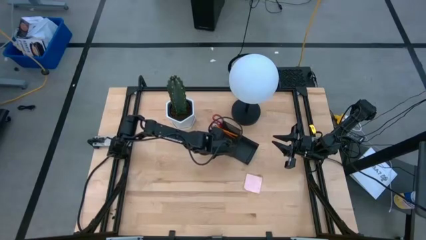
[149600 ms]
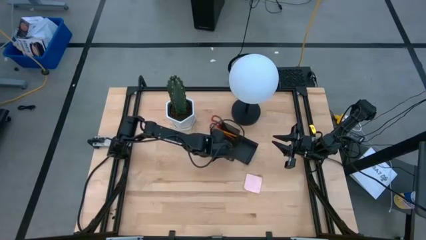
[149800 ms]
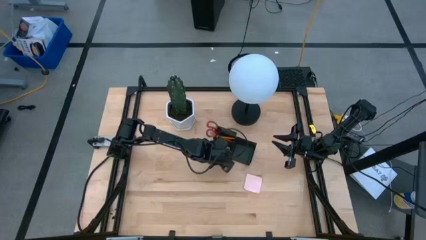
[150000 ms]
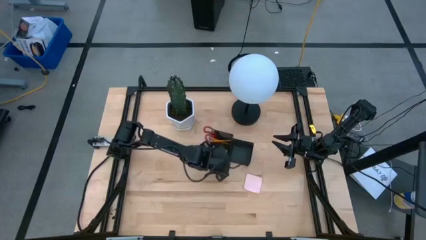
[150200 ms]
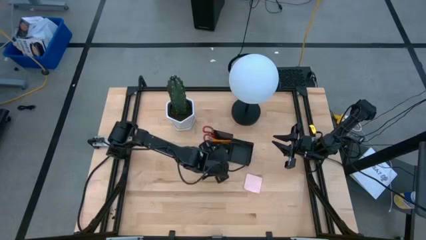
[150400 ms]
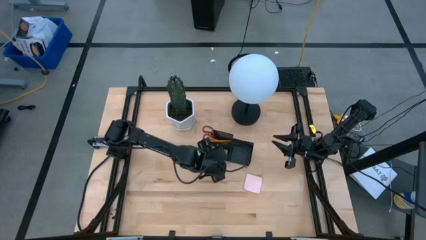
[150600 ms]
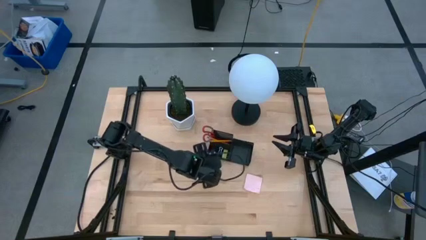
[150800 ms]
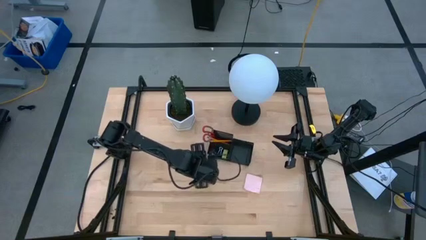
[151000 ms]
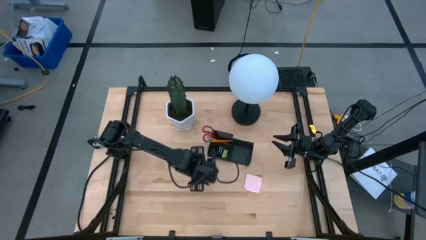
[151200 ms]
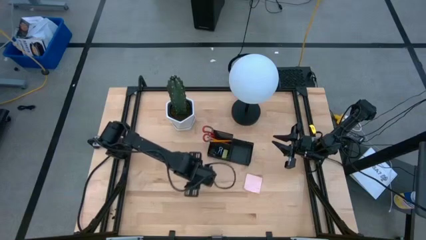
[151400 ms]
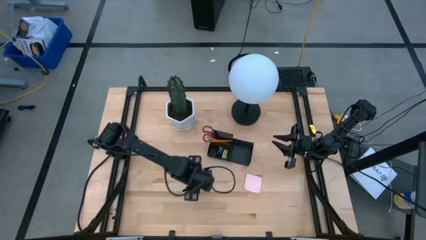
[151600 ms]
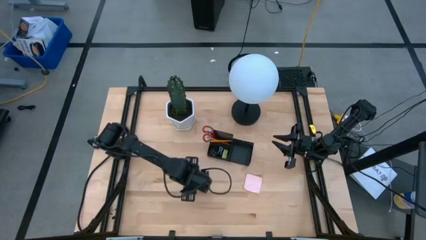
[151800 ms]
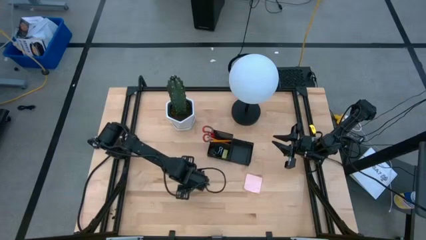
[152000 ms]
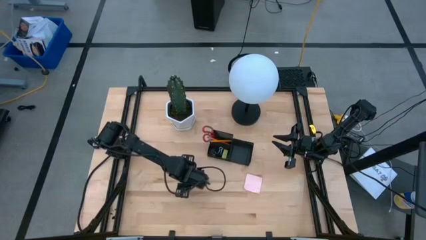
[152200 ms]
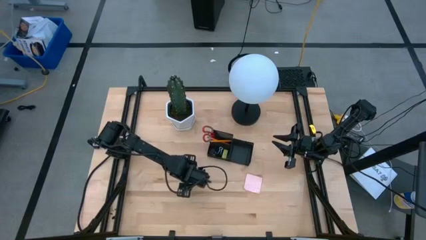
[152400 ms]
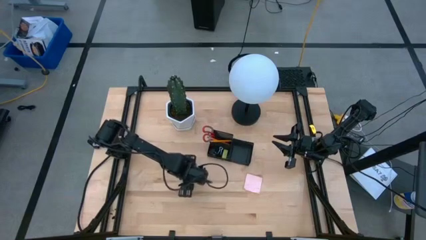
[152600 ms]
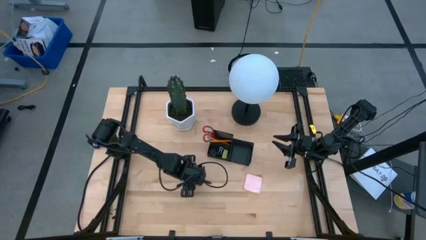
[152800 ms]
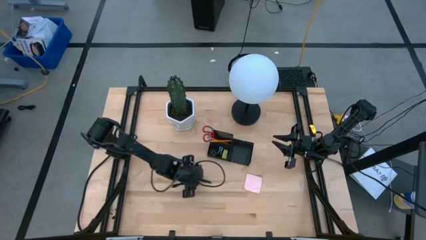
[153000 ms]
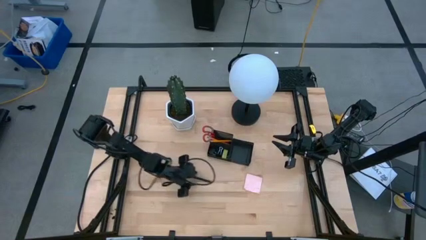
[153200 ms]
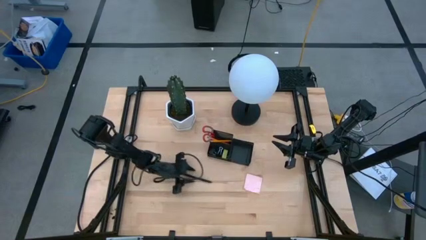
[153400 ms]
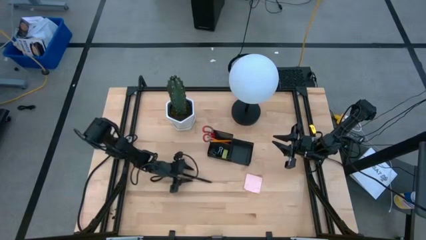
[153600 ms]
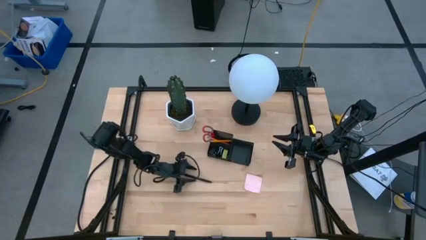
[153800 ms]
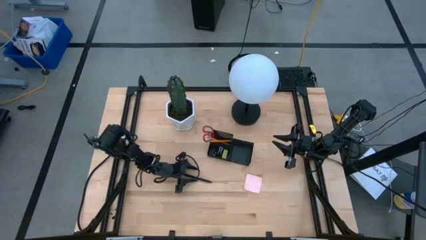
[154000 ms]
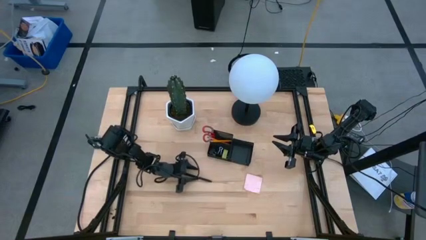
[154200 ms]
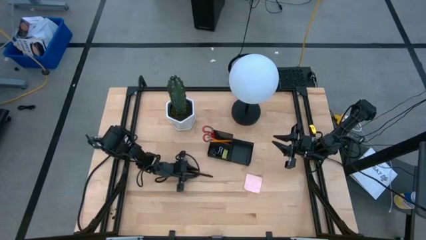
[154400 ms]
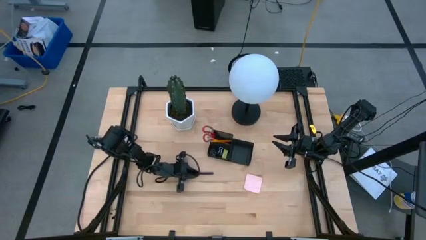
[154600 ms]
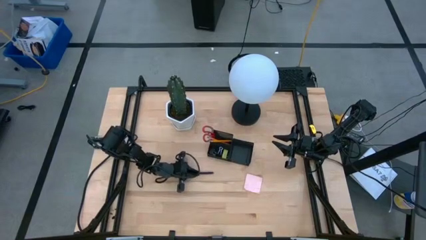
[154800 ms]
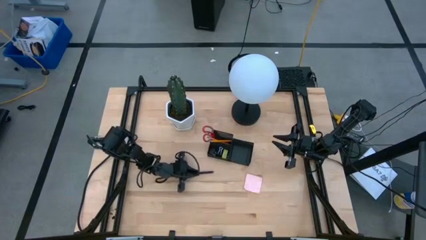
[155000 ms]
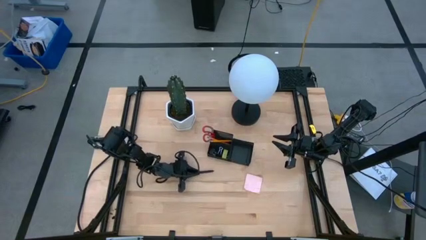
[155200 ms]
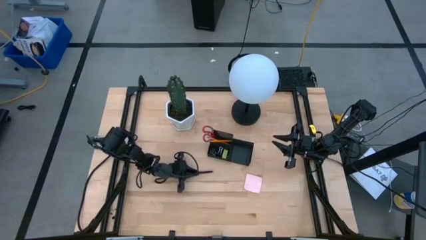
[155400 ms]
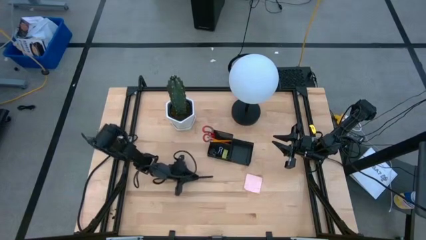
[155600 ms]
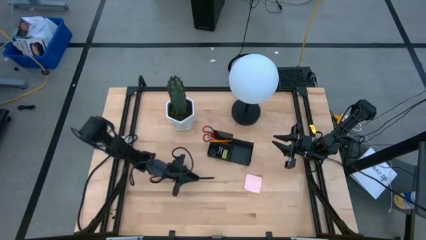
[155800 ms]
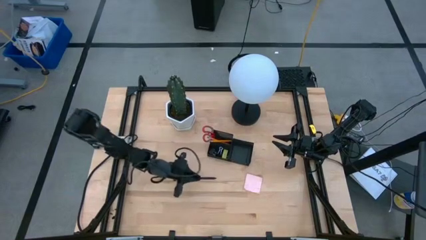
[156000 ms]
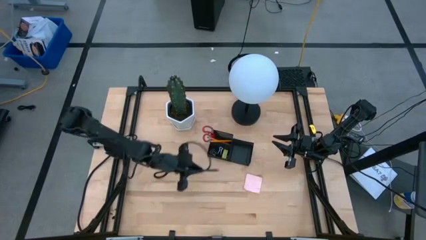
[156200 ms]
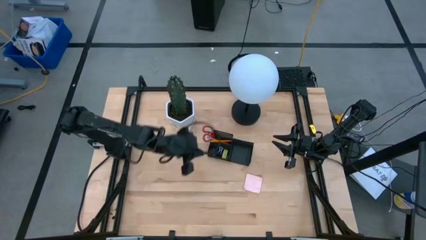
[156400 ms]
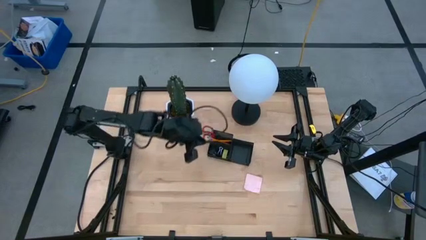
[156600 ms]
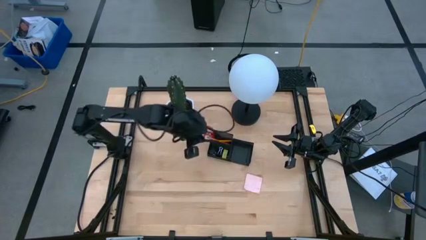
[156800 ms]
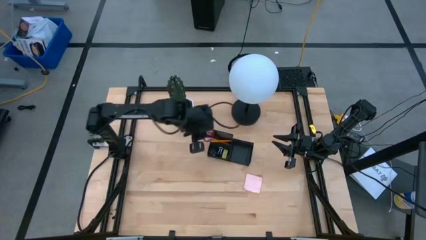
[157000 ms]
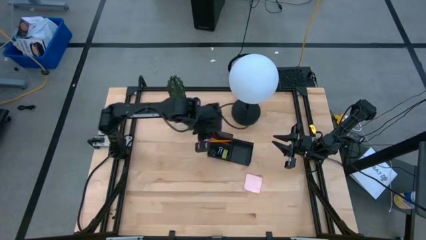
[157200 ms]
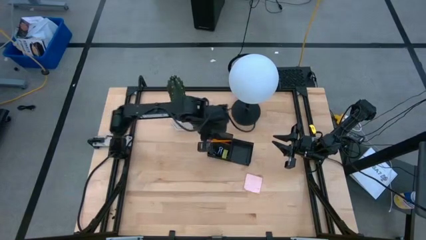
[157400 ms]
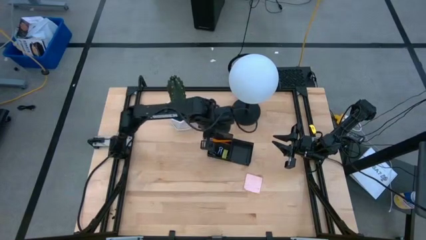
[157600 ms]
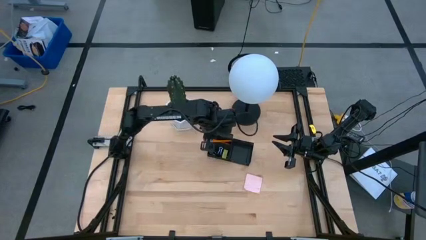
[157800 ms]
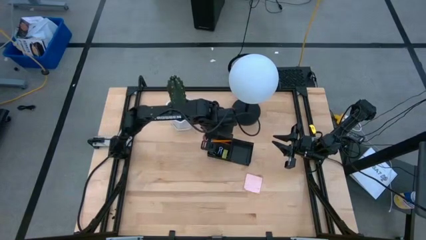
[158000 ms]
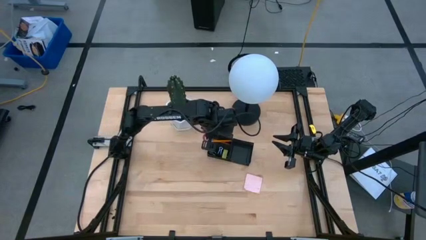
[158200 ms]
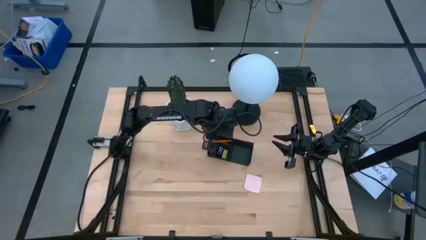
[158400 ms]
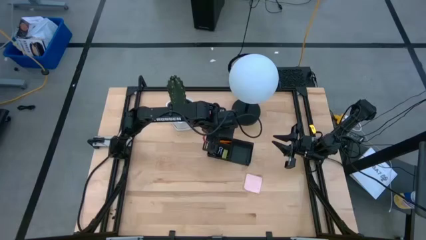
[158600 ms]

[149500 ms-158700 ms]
Task: Pick and place office supplies into organizer
Put the black pen into the black desk organizer

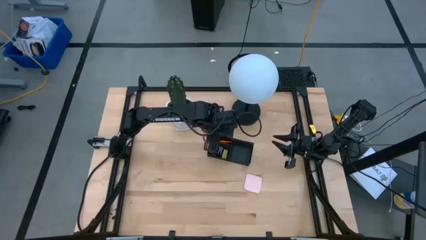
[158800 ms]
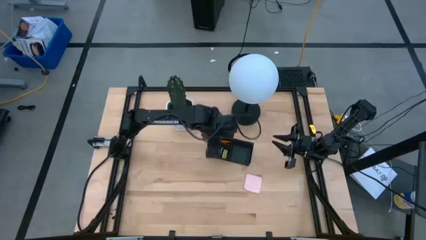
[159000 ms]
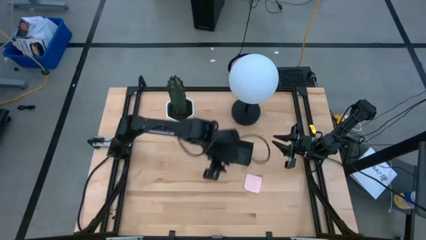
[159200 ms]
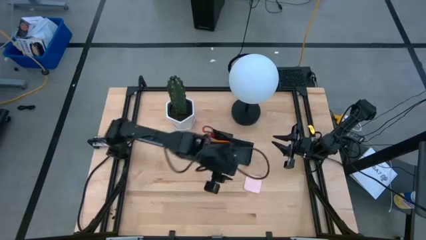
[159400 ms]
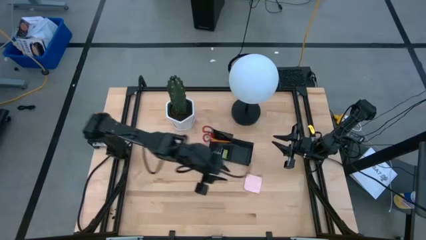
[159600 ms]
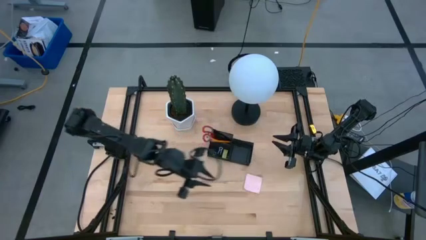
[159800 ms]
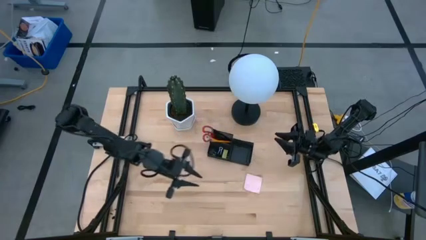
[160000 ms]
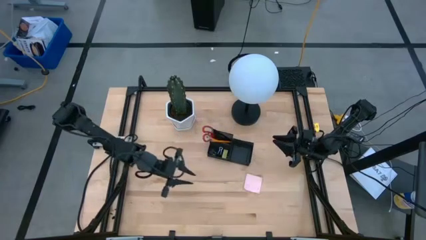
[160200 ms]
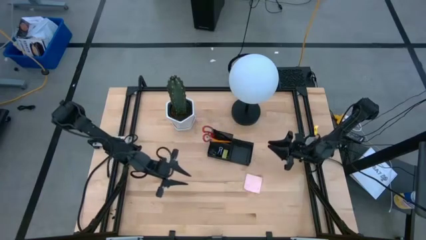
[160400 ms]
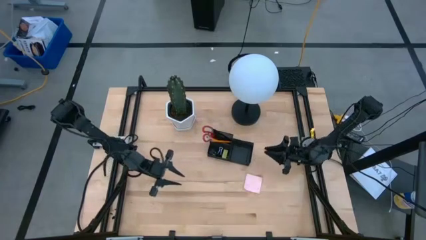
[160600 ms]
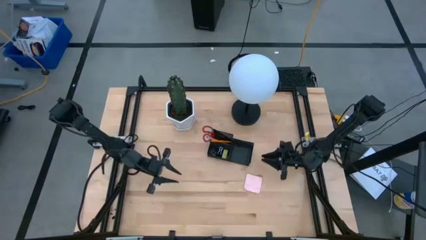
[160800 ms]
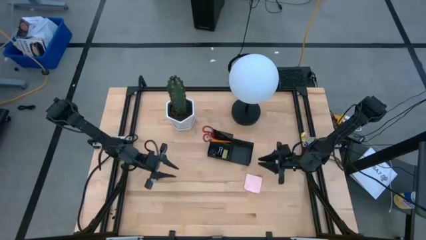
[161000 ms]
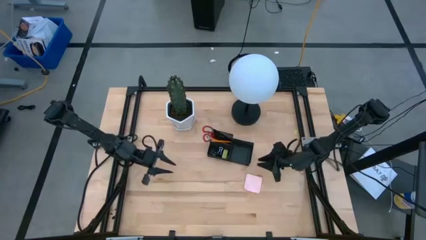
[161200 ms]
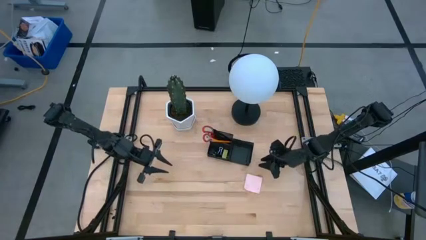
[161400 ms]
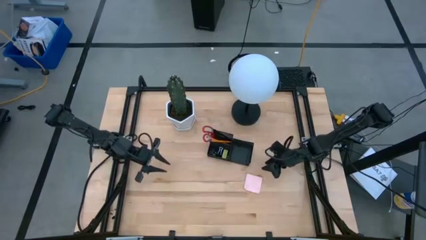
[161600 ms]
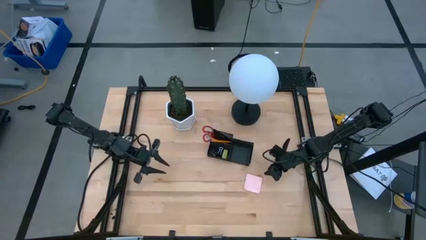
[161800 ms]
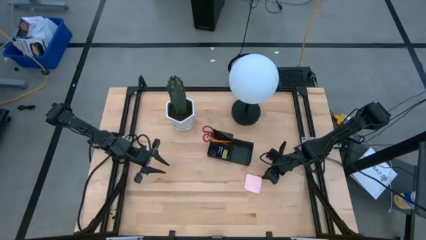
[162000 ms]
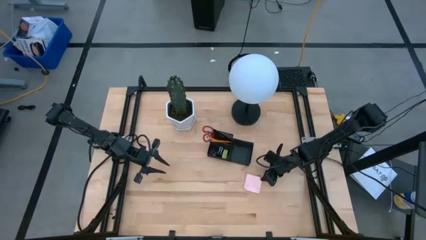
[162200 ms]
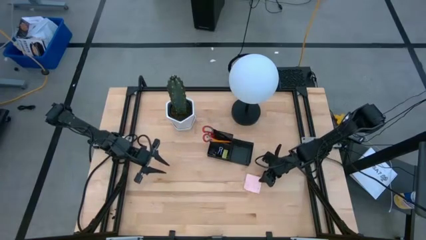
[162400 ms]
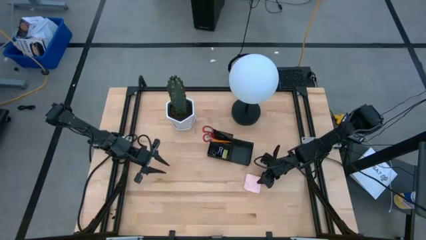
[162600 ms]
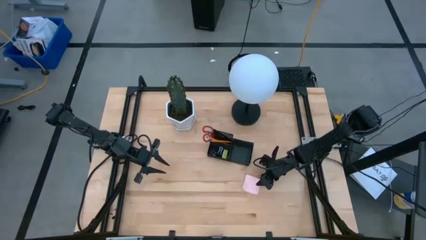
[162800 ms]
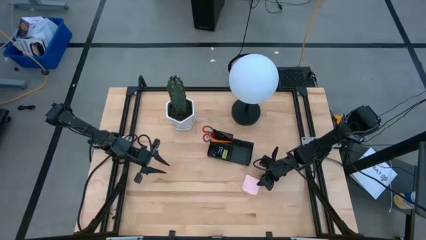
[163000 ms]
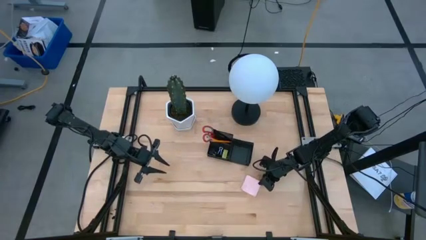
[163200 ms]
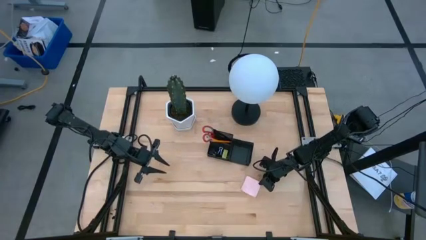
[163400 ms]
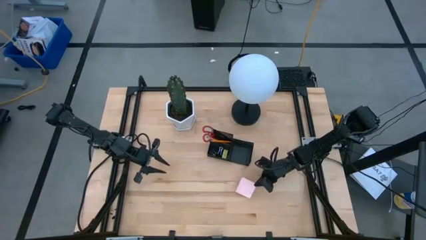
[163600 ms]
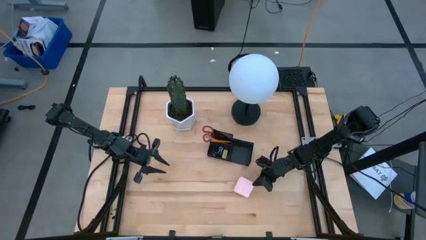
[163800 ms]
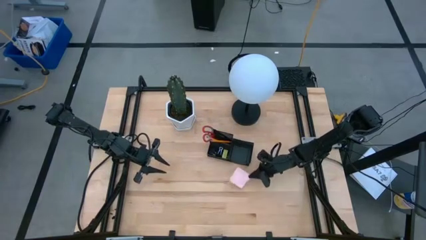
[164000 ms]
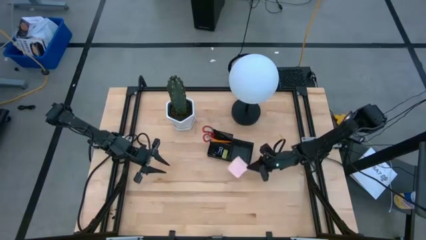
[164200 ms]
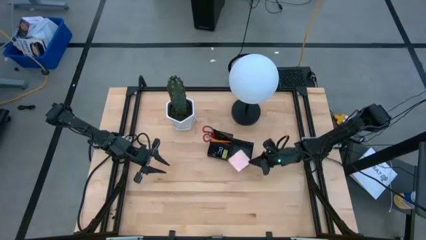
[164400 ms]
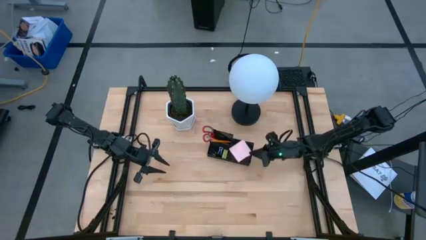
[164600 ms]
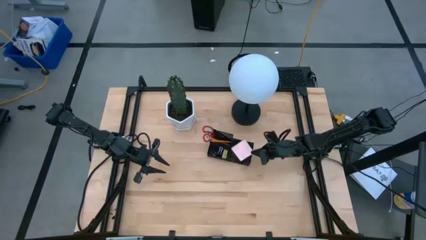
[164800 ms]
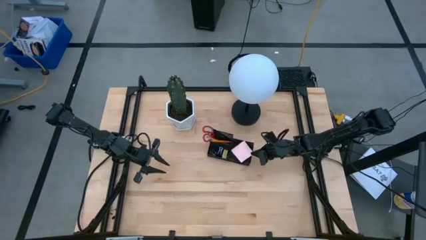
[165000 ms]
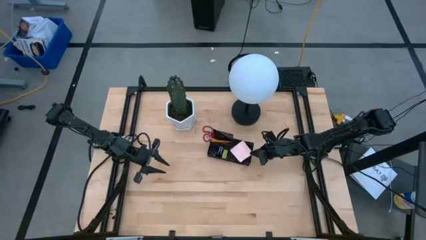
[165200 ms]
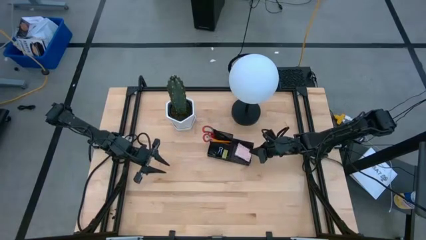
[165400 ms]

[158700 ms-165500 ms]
Put the pink sticky note into the black desk organizer

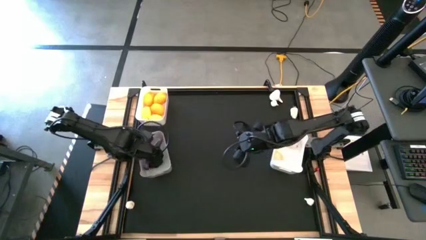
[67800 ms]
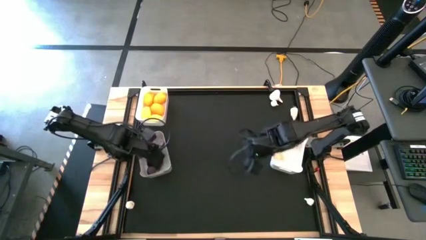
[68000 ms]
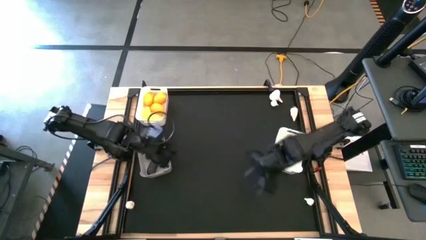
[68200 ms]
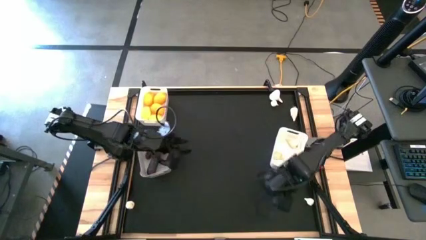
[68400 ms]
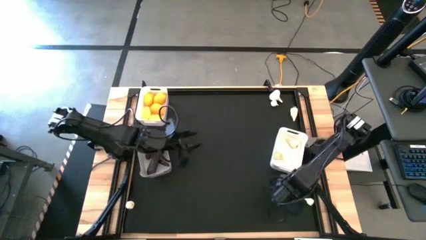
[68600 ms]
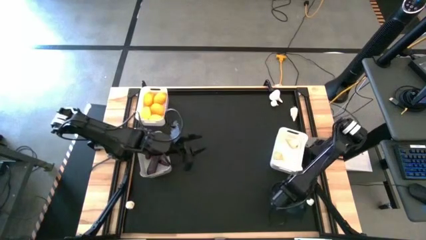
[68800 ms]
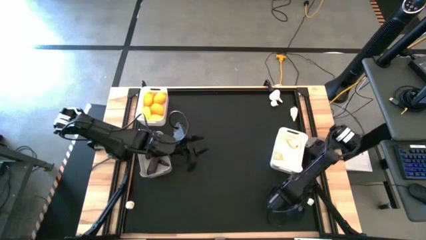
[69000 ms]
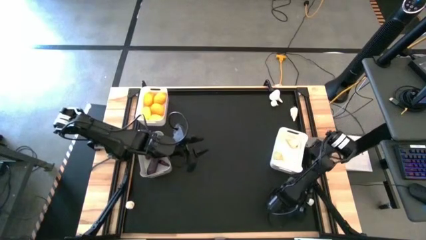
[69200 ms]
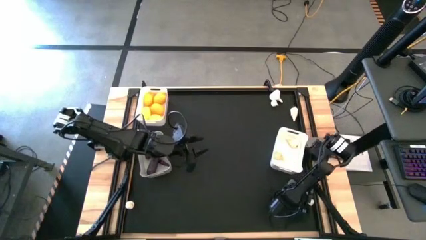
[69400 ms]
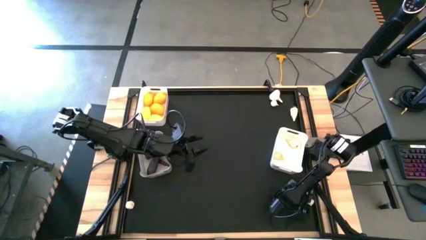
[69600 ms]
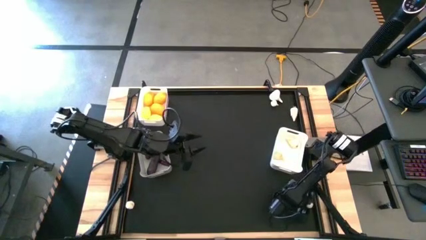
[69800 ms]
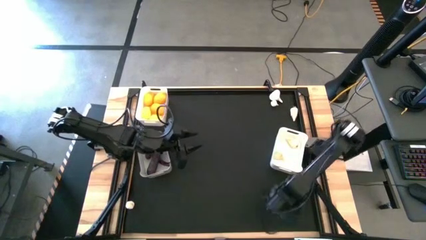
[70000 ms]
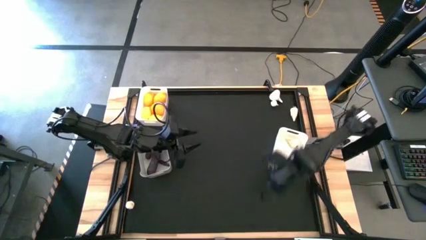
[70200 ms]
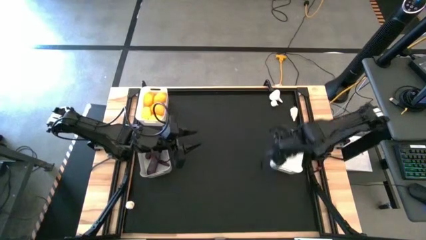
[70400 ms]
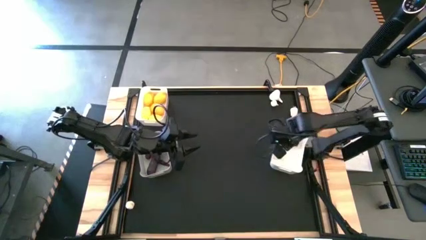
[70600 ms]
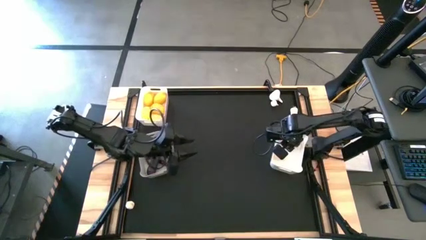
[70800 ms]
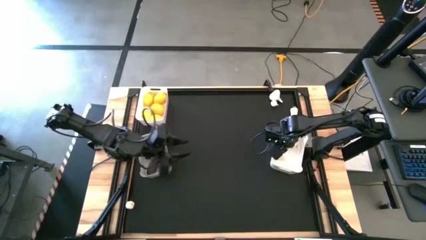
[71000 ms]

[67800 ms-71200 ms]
Task: Sort produce into baskets
Put the white garlic into the bottom white bin
